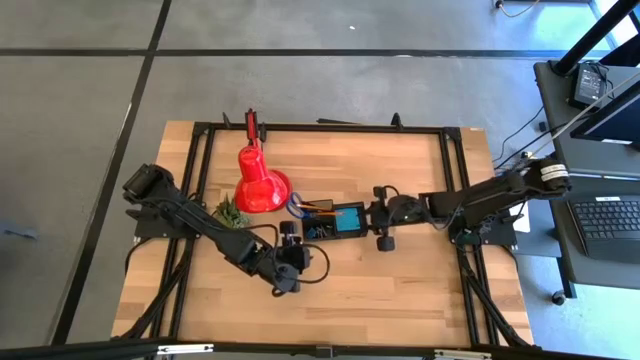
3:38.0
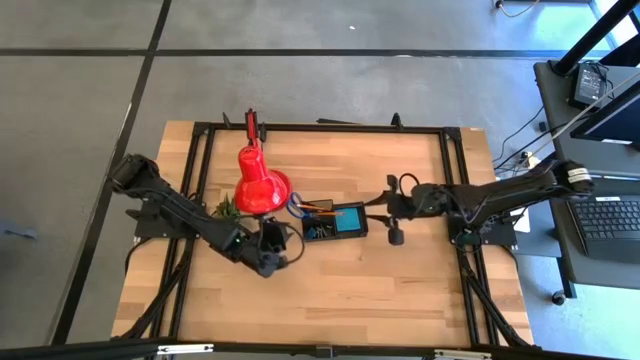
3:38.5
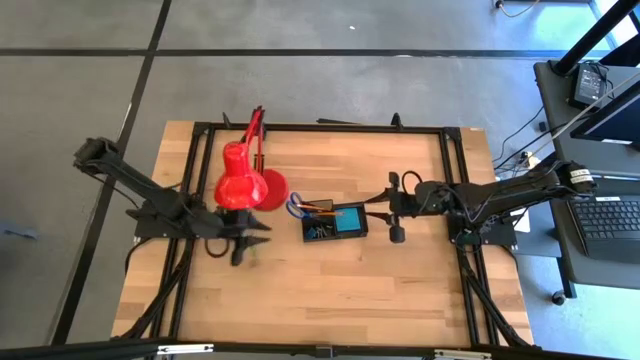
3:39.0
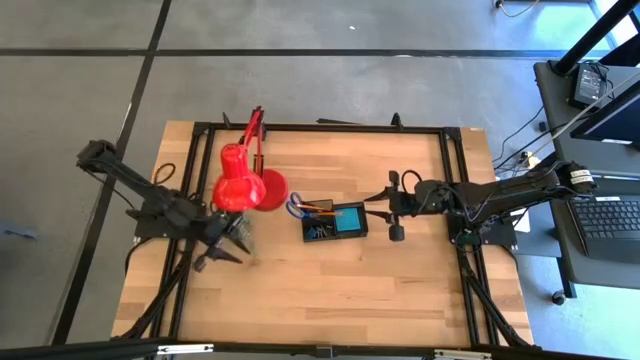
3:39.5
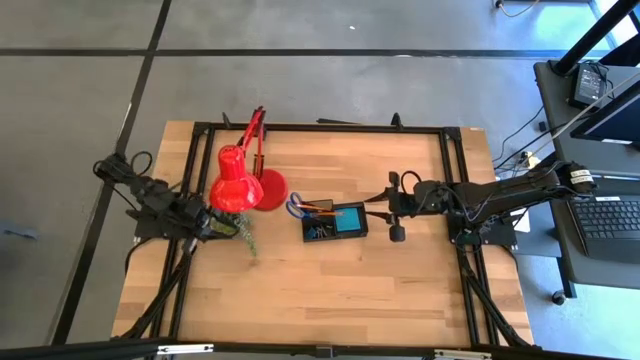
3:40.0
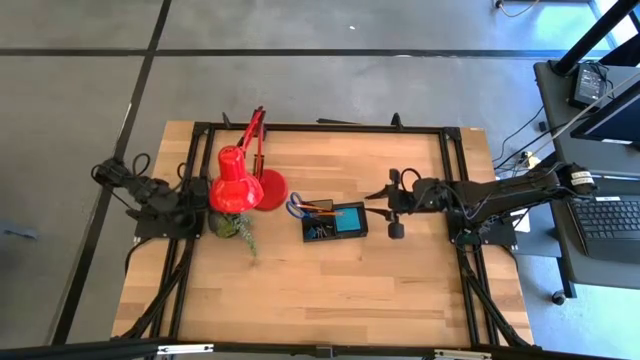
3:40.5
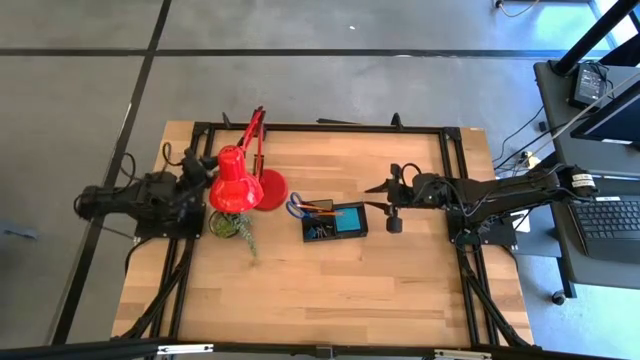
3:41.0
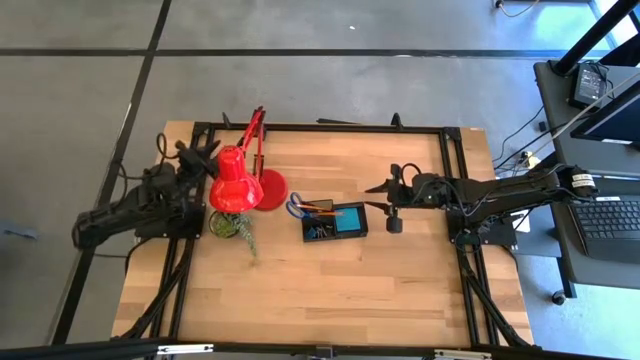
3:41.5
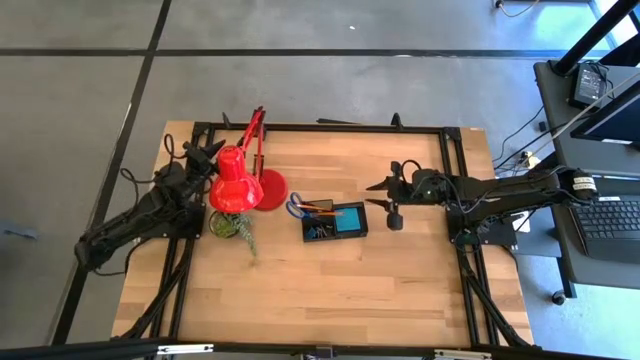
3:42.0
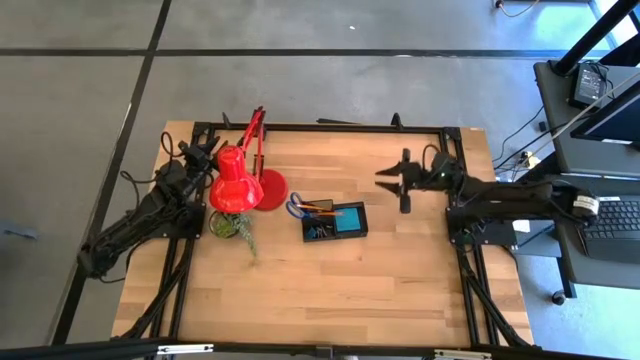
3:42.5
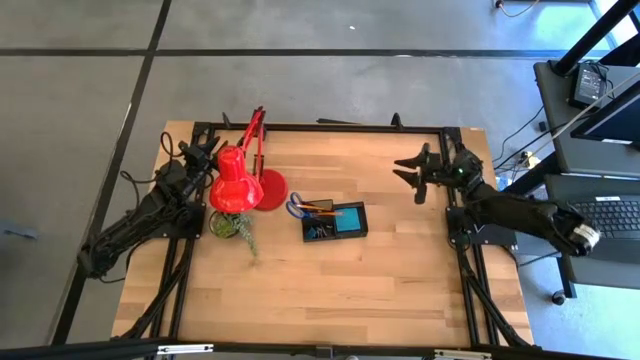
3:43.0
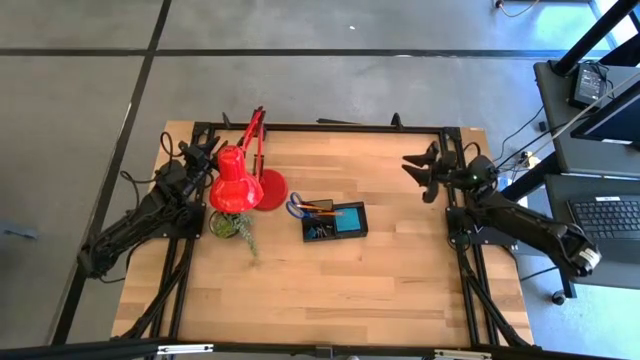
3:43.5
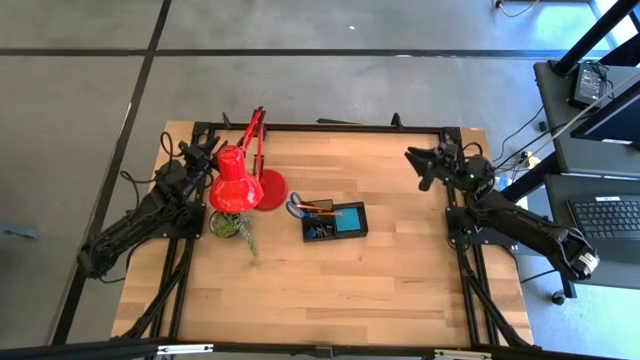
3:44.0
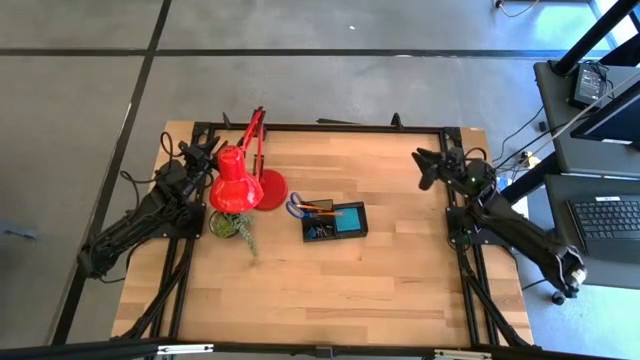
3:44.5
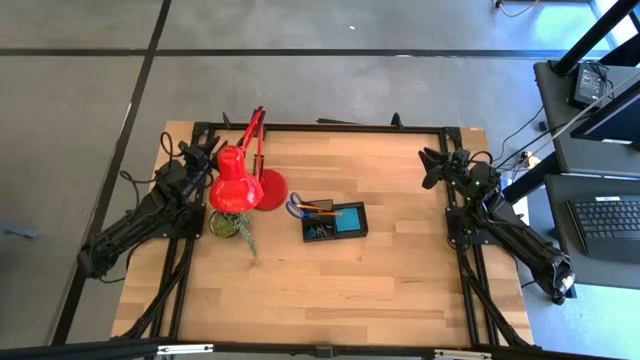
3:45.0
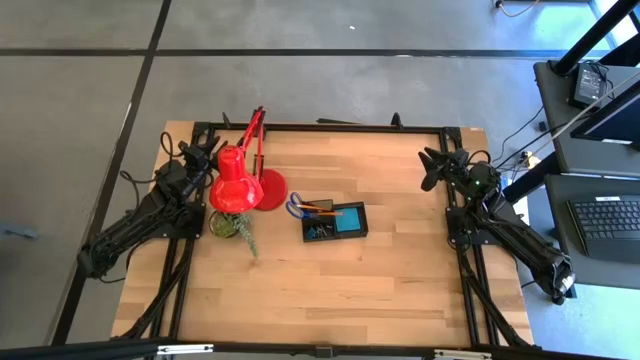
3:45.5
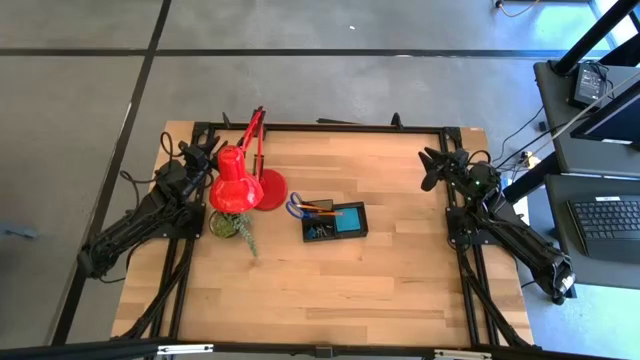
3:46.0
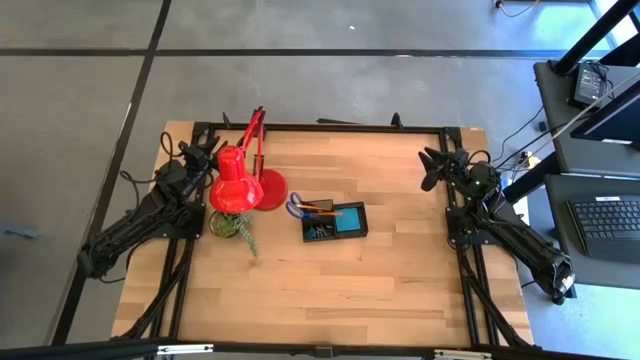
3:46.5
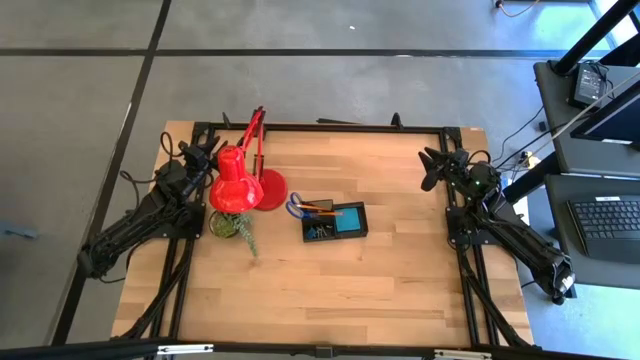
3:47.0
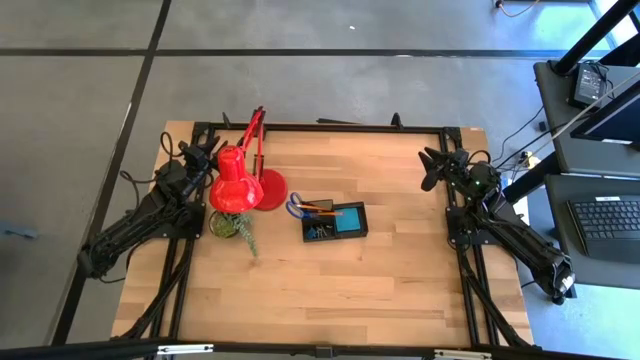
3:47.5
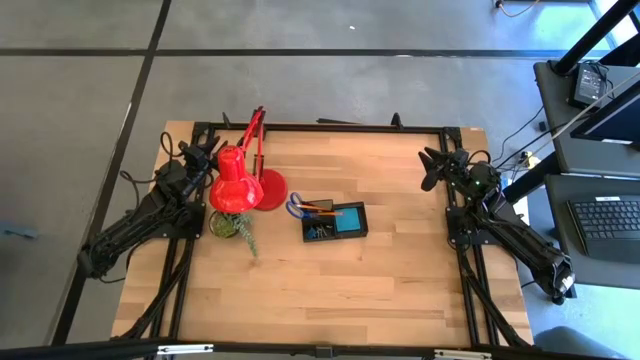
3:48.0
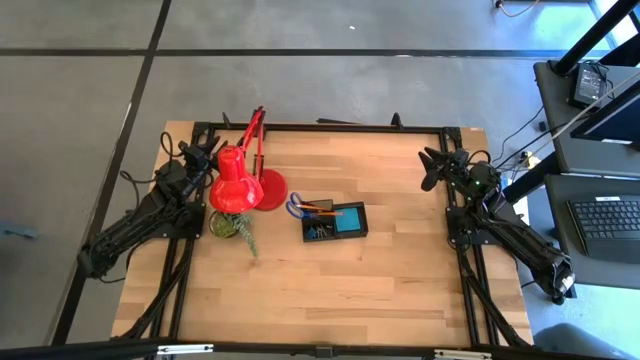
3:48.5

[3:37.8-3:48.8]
Task: Pick and place office supplies into organizer
Return to Home Position

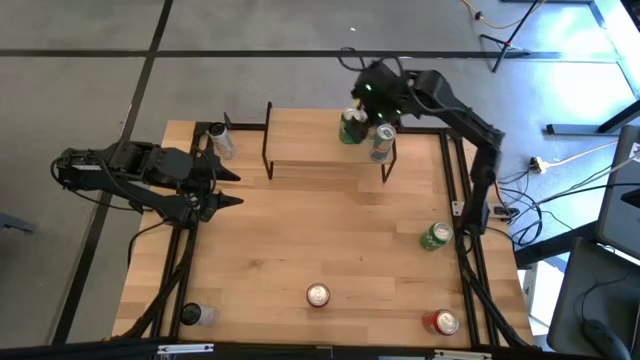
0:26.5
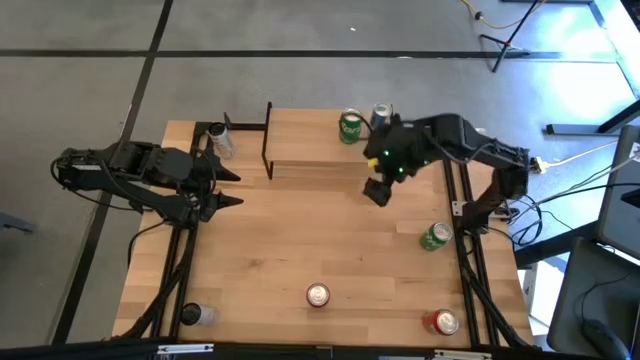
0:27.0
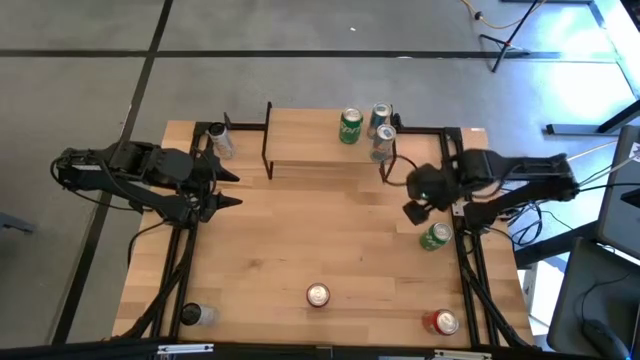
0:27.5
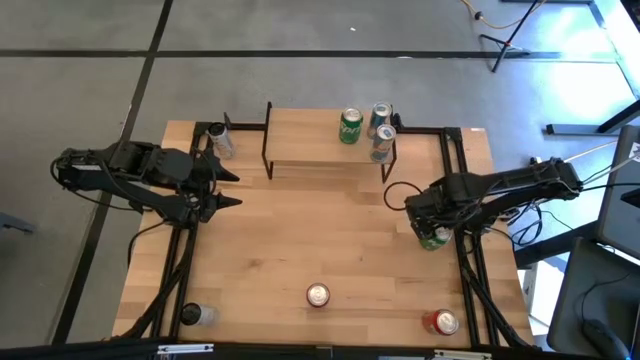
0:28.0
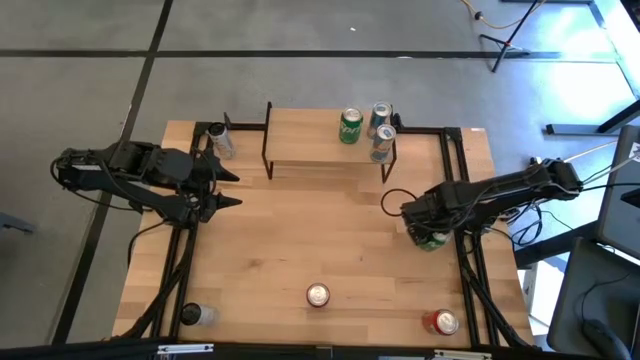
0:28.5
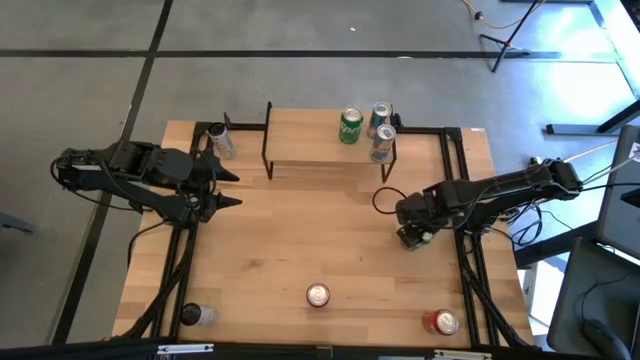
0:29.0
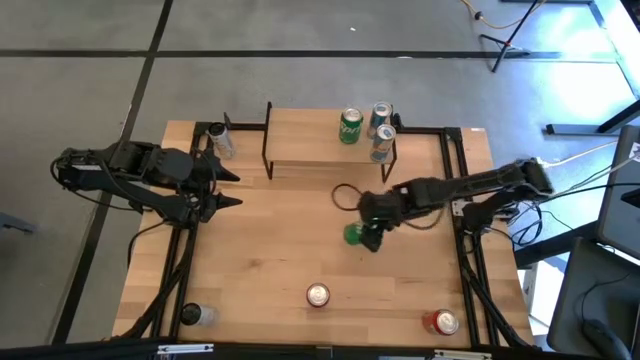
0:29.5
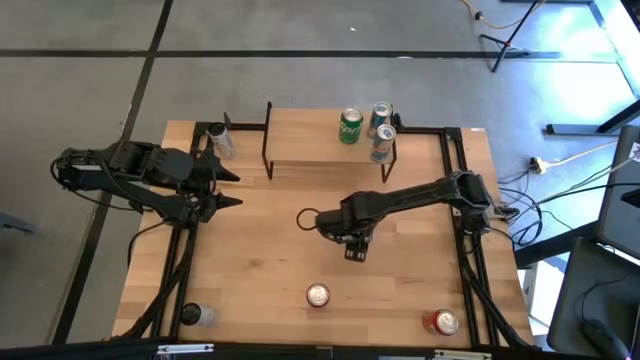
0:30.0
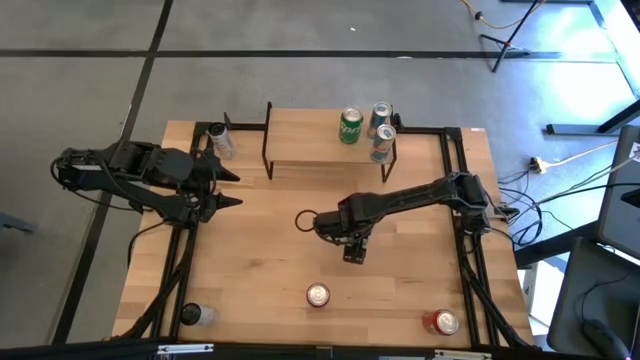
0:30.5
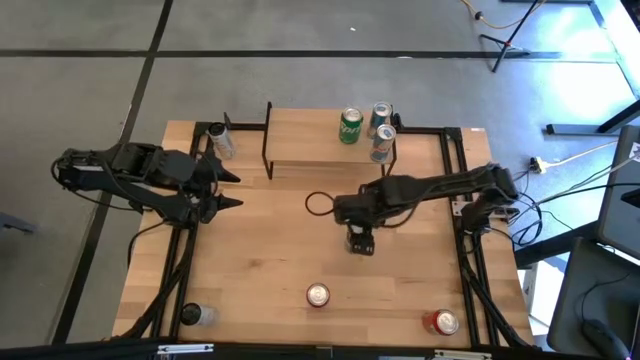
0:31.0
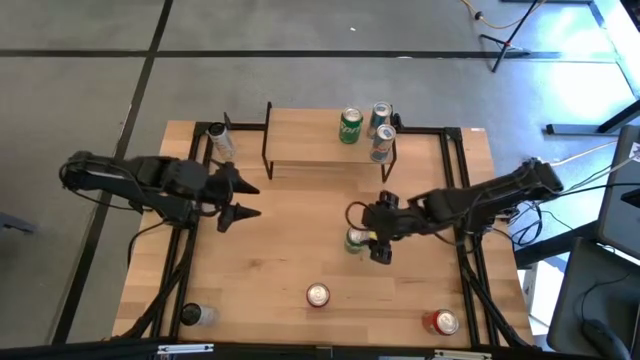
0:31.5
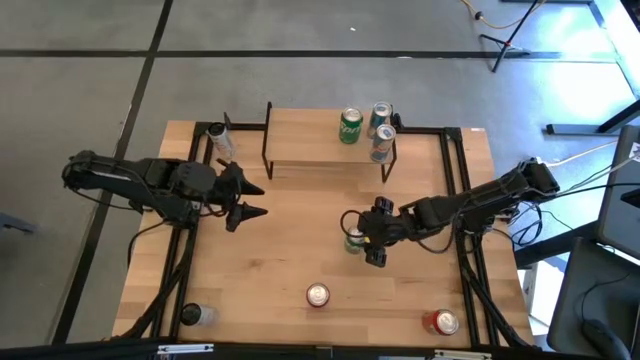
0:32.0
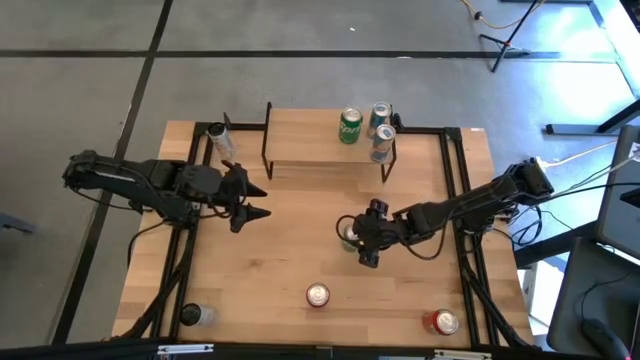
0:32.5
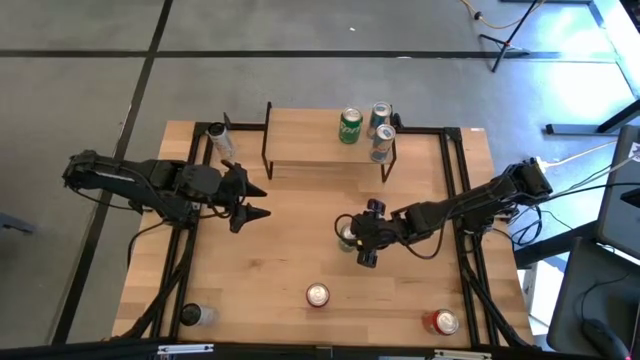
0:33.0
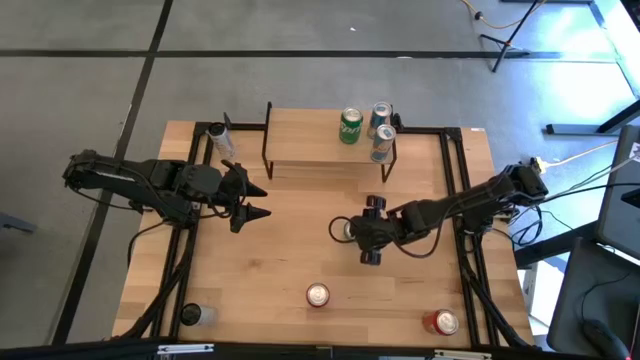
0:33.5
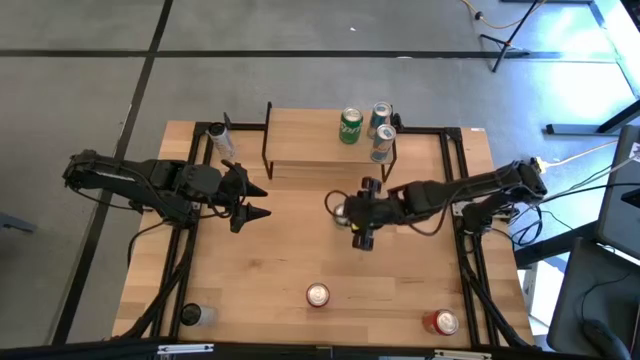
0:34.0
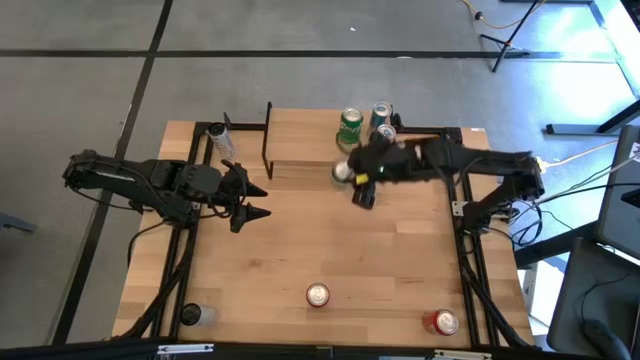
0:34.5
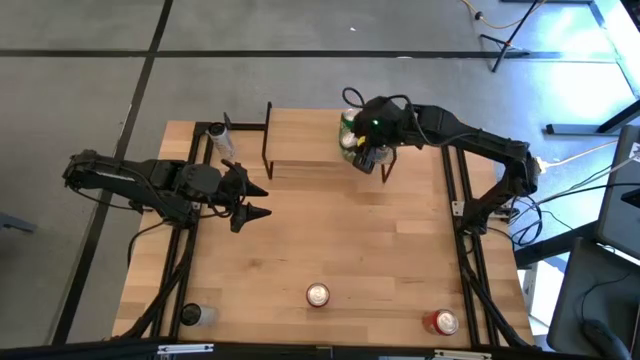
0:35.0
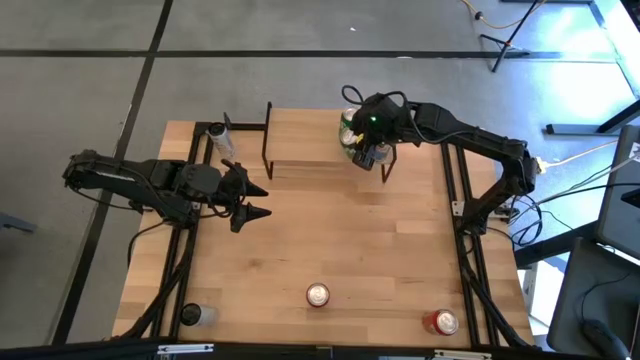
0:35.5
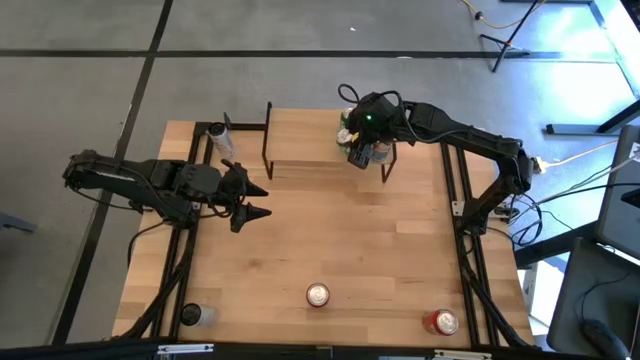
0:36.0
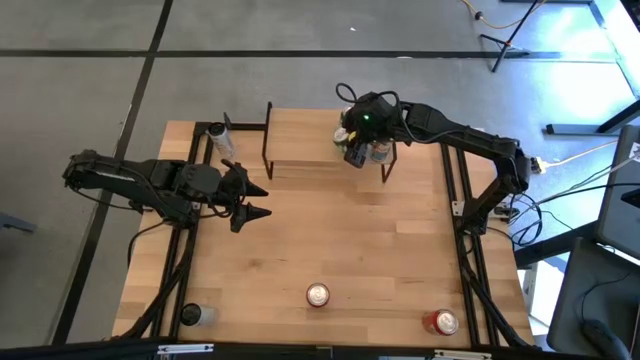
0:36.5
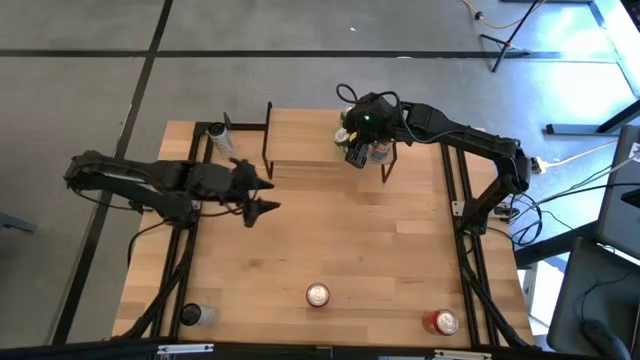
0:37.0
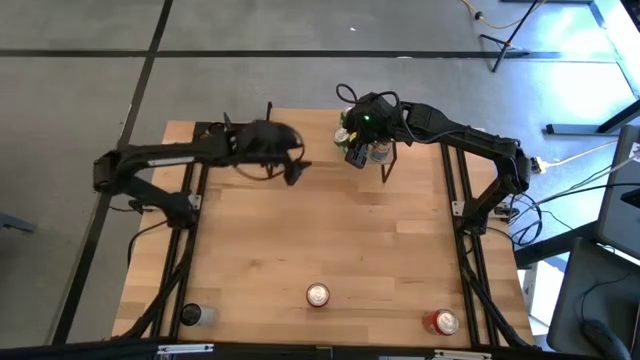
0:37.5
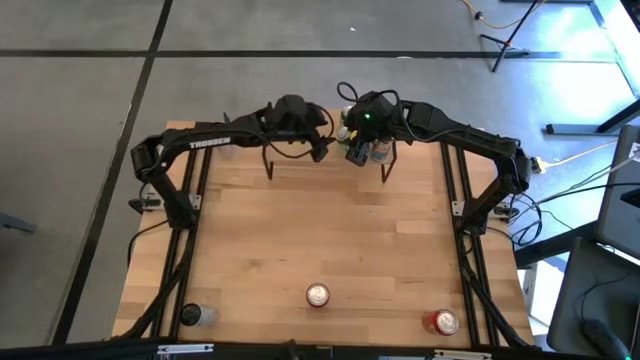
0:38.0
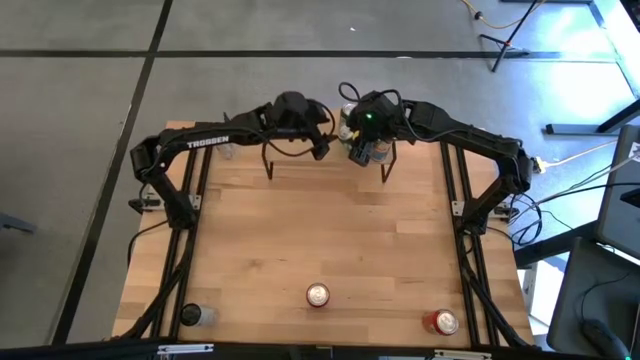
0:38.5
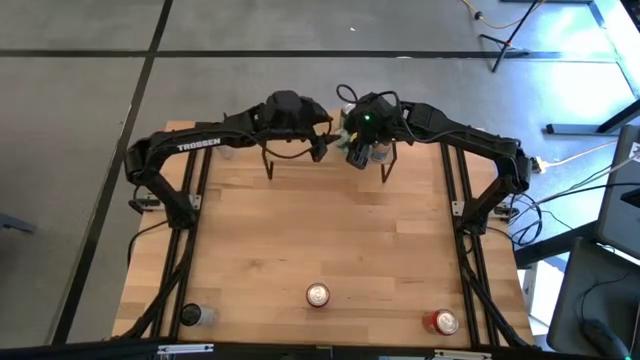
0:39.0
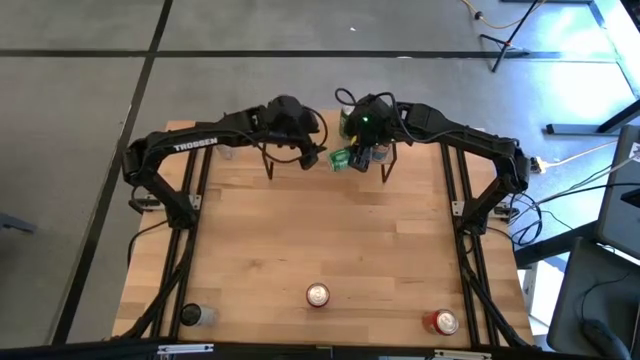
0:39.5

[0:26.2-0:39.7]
Task: Place canned beverage on shelf
Put the green soda can on the shelf aligned with the other green soda can
